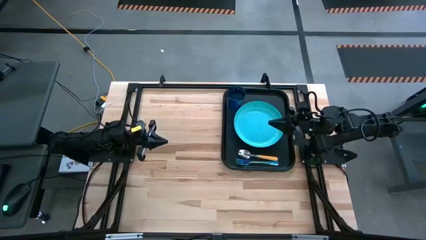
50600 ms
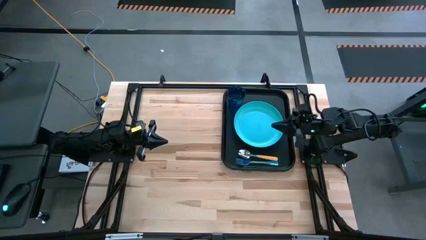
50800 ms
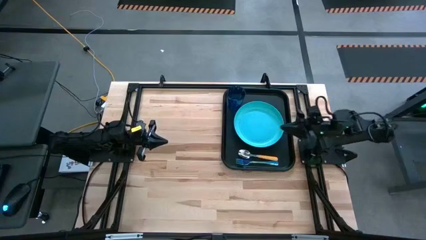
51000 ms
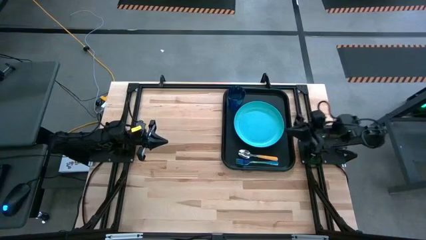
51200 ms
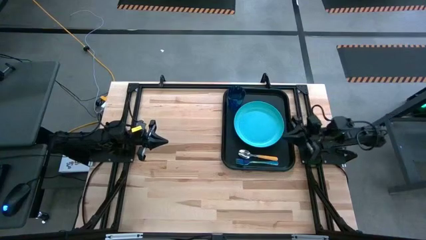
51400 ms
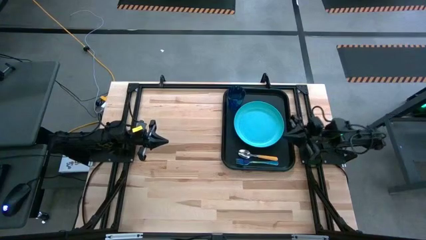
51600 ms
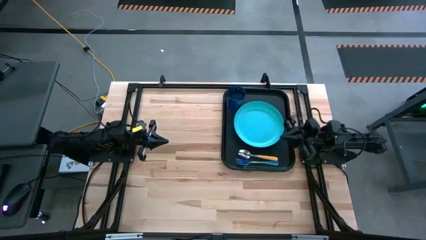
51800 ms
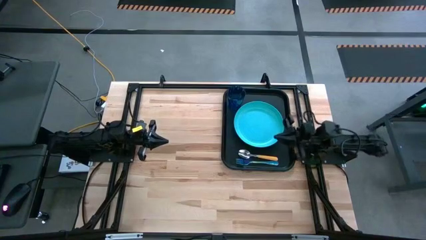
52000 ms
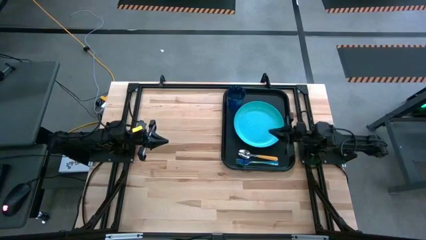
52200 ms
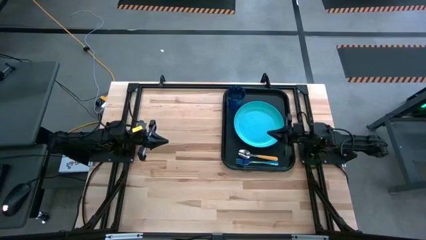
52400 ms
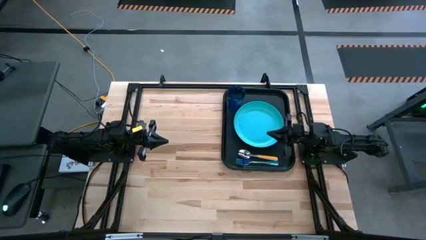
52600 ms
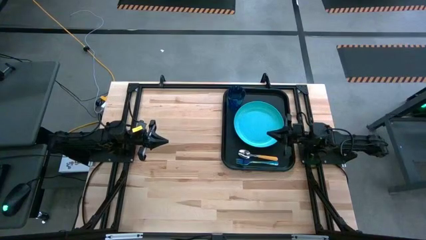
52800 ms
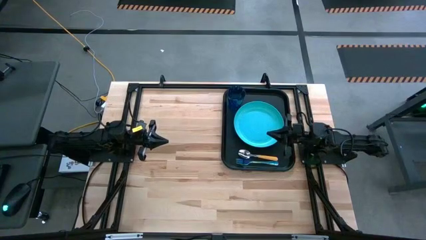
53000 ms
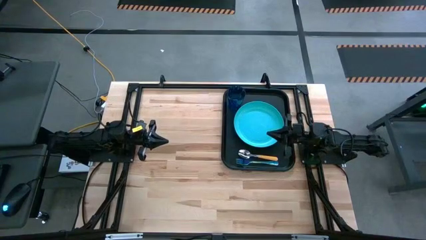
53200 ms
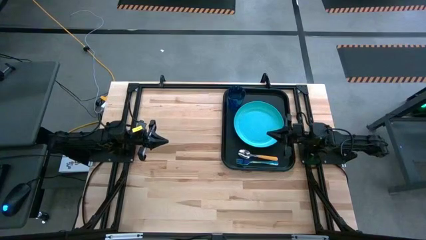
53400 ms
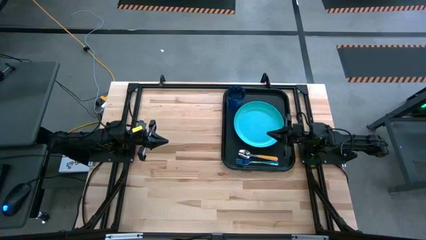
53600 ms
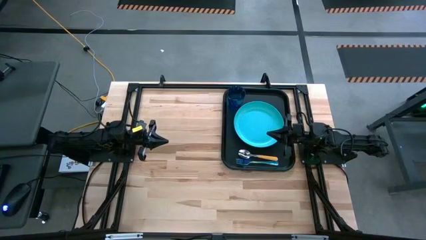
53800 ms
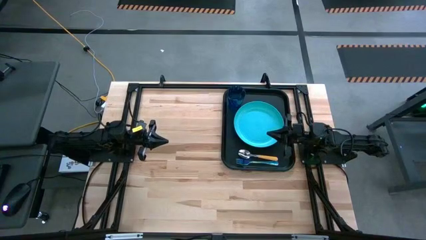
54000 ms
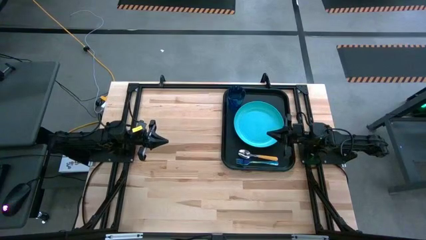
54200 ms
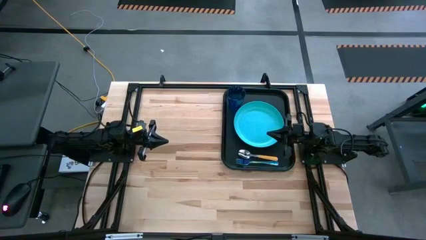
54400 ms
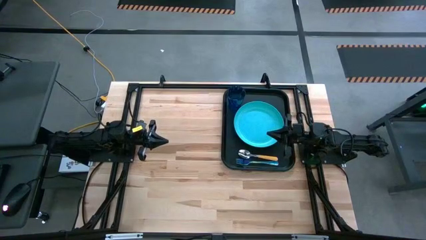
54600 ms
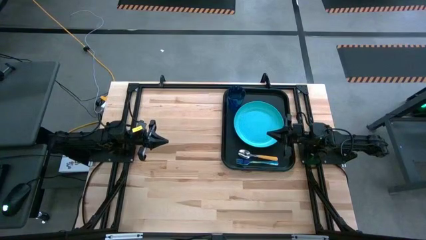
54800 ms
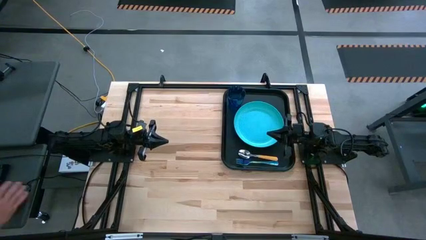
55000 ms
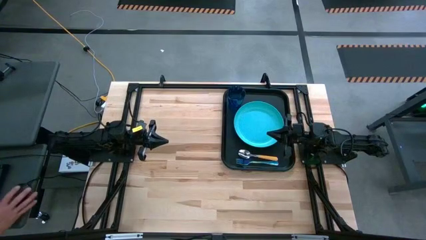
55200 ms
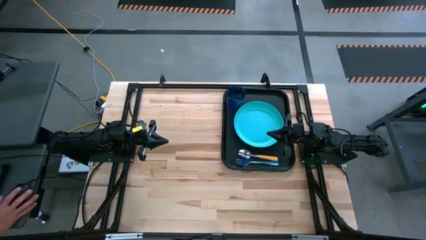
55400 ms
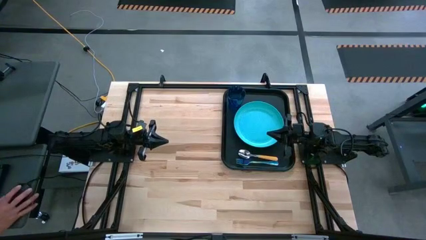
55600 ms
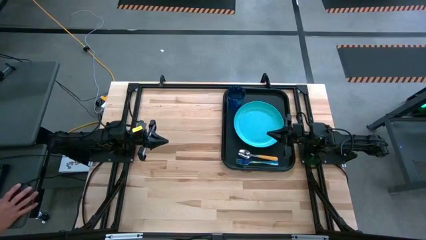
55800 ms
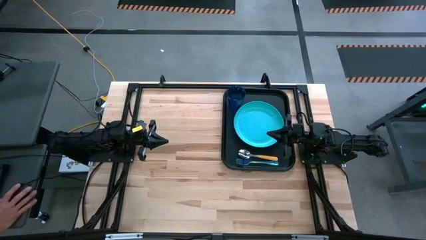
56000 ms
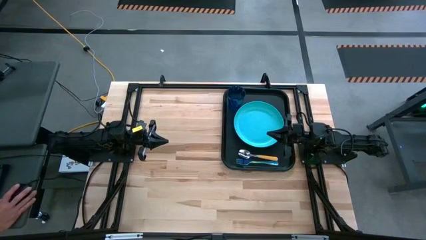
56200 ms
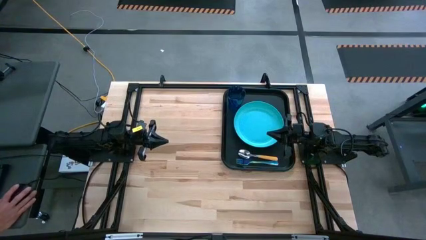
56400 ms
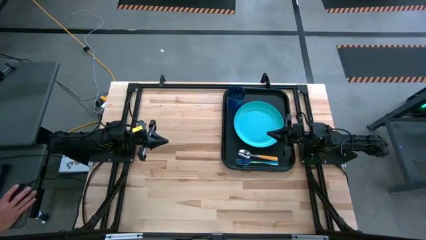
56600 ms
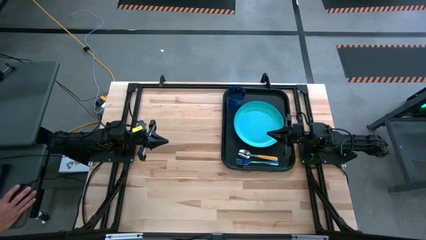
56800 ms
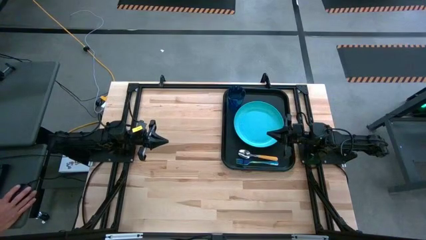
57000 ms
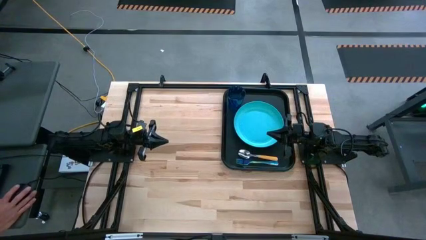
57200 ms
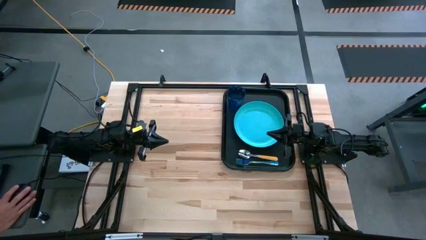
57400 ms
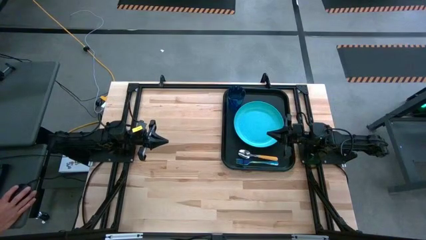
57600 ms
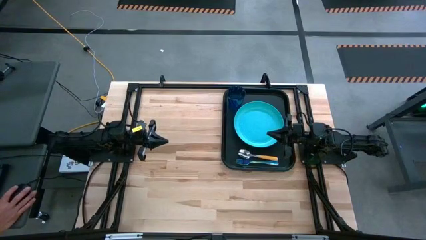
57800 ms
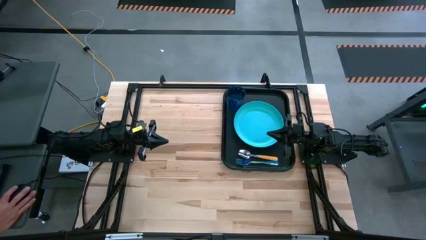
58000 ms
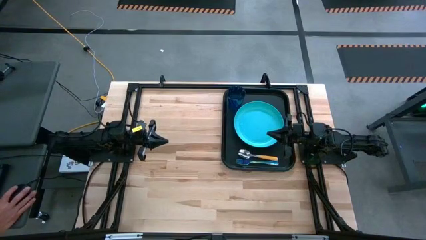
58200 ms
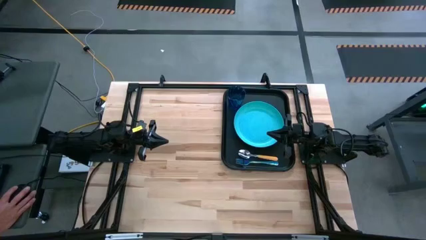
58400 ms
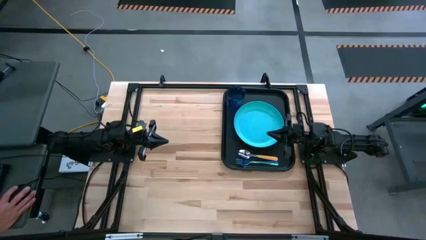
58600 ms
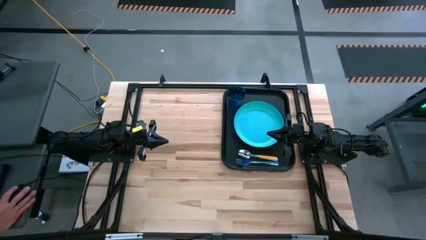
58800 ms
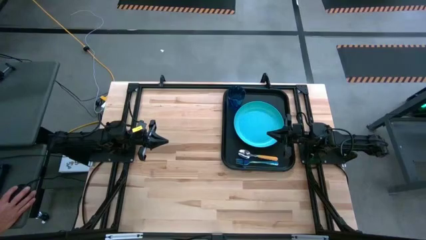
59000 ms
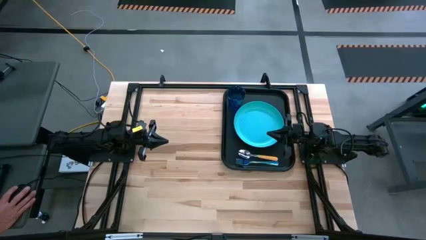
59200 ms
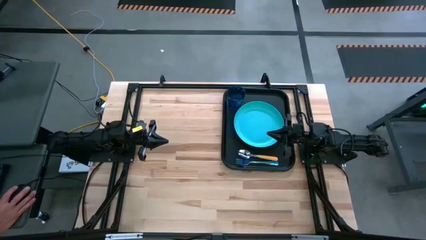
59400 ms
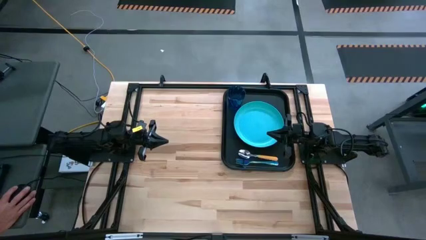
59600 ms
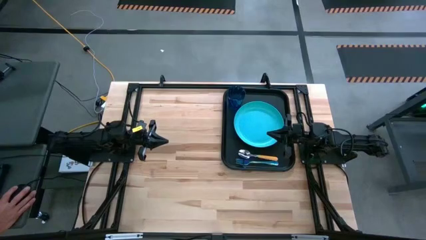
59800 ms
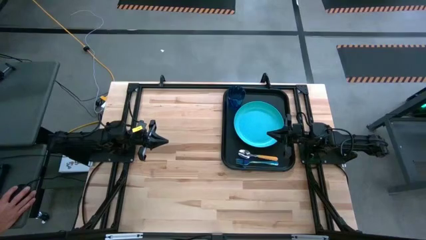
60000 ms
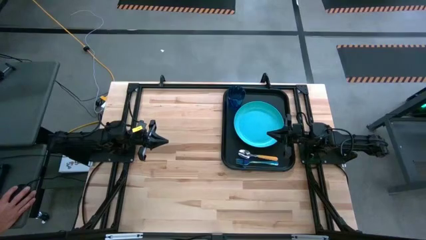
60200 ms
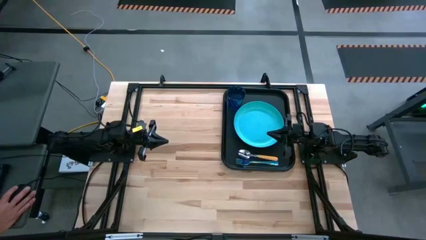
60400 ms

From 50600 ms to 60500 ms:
Task: Pick and place plate/cup/fork/spoon on tray
Return to Home Position

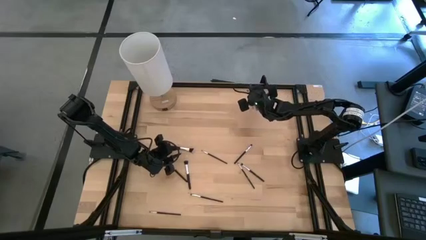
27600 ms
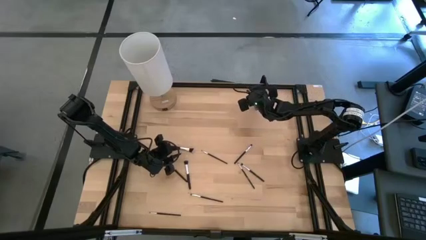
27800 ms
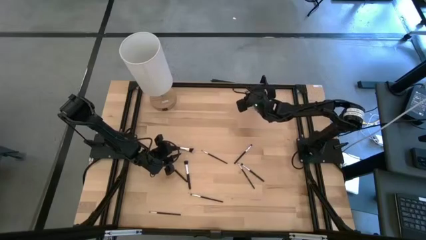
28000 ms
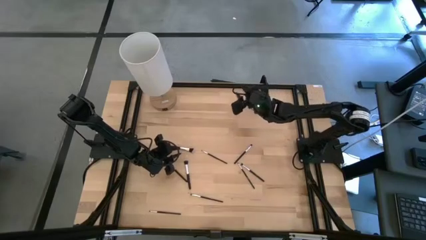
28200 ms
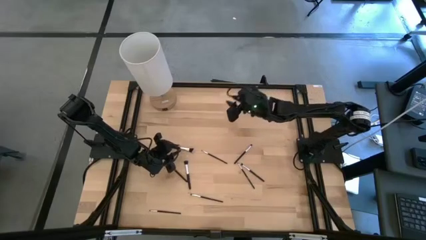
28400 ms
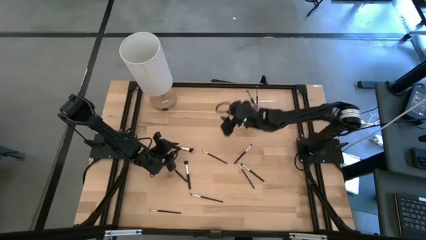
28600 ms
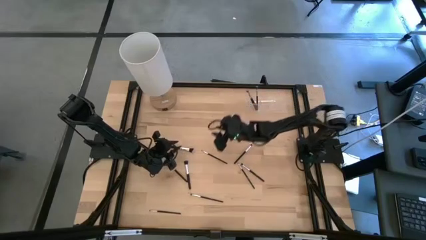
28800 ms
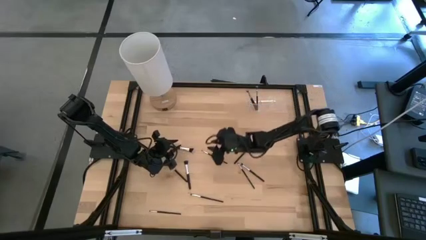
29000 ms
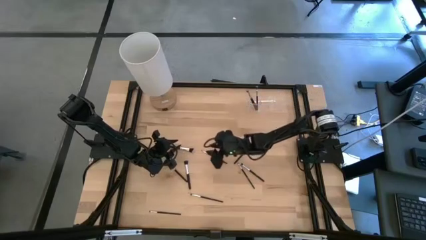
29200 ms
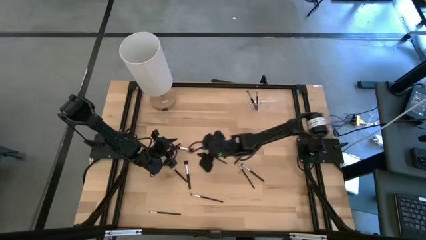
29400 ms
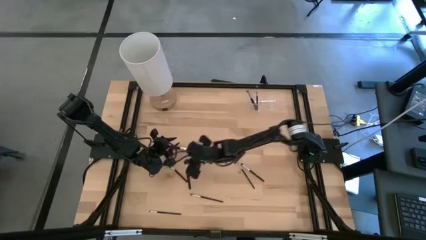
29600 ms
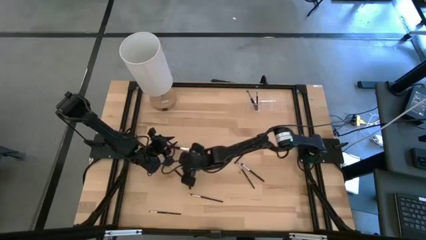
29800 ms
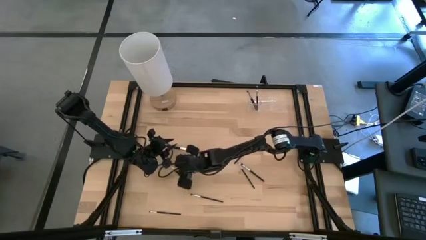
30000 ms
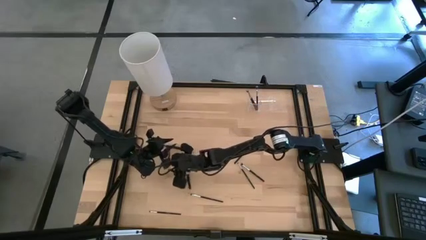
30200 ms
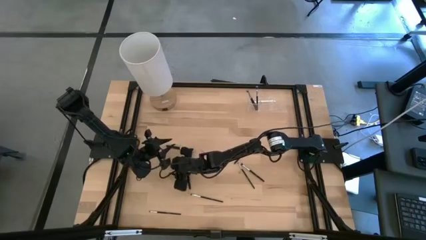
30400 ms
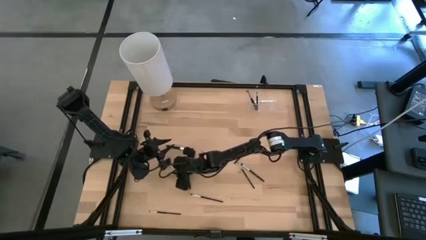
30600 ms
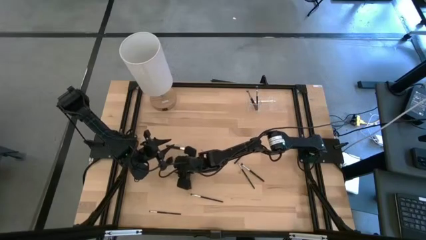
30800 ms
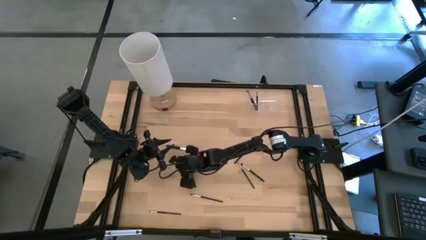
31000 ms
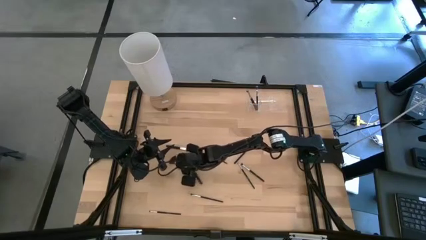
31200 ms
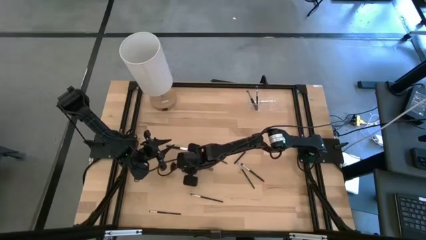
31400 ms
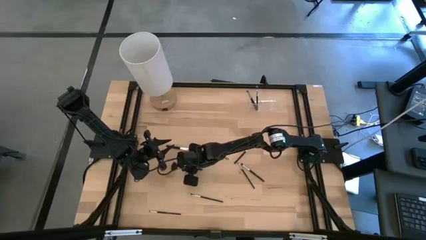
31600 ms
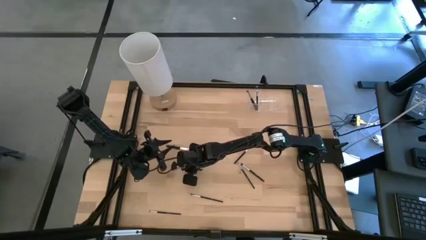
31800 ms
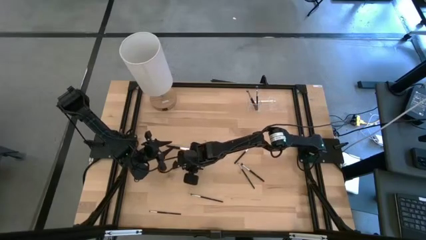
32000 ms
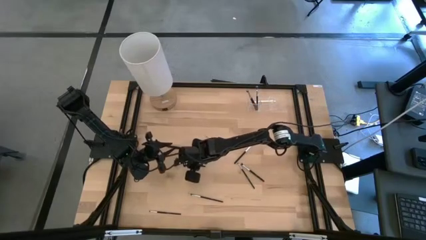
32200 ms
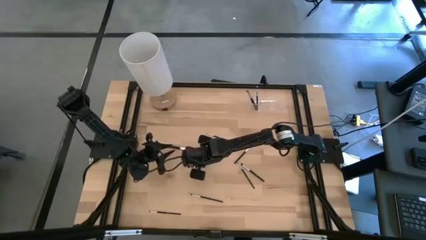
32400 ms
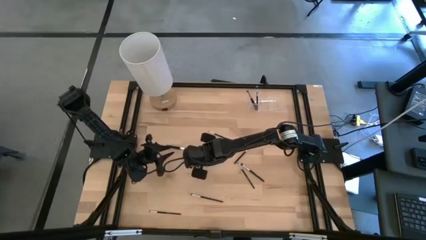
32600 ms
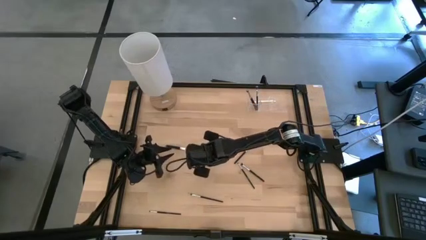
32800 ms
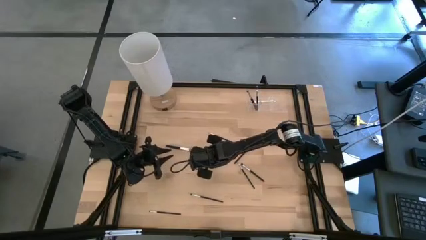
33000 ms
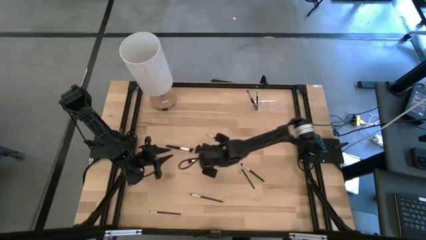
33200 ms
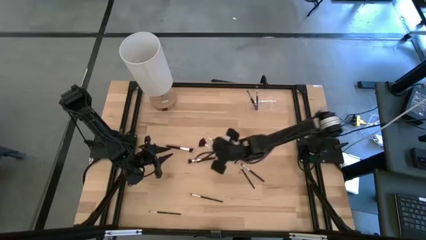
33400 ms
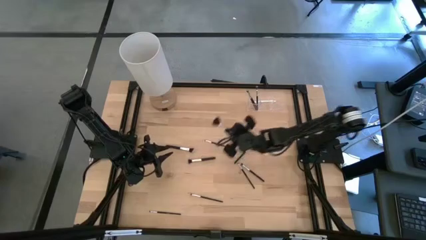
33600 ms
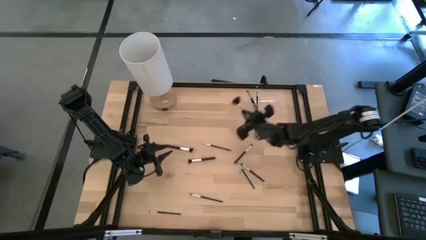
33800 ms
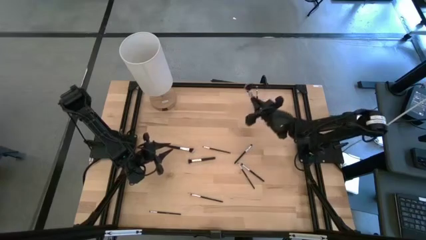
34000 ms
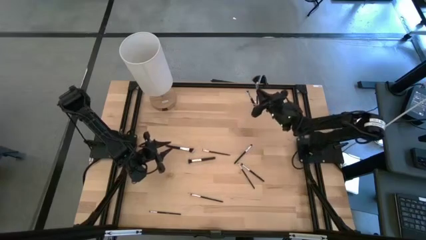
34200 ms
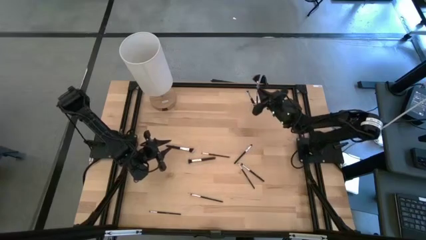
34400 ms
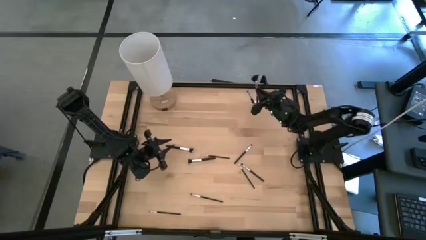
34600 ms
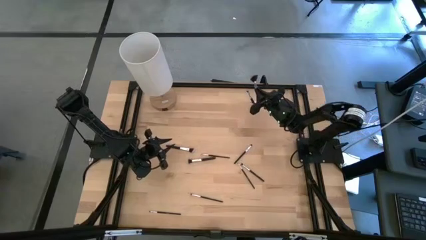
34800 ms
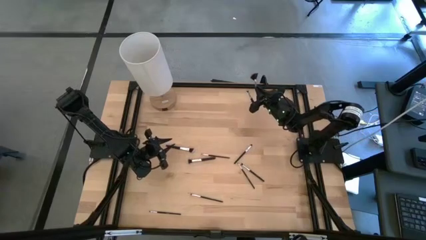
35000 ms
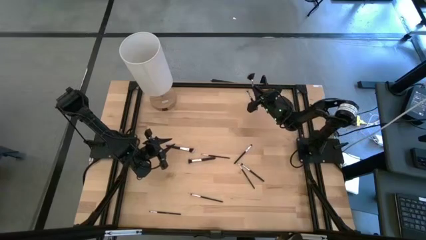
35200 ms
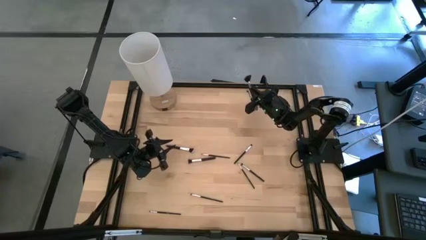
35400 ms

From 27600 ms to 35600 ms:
Task: Put items in baskets/containers
Put the highlighter brush into the left side of the transparent organizer
